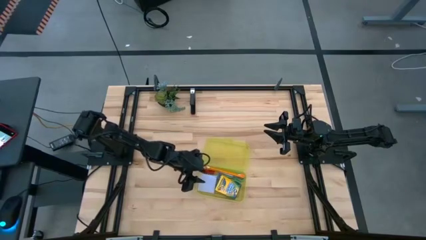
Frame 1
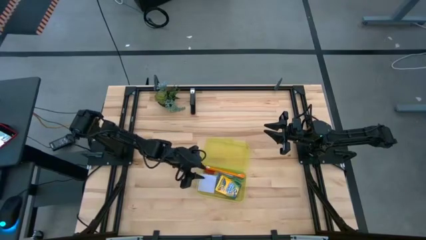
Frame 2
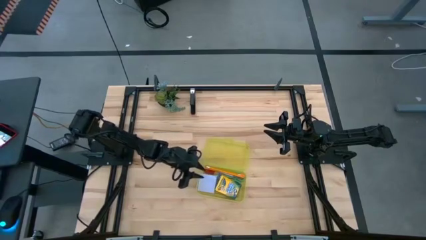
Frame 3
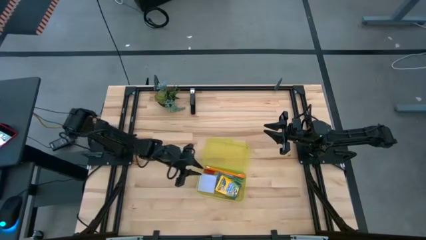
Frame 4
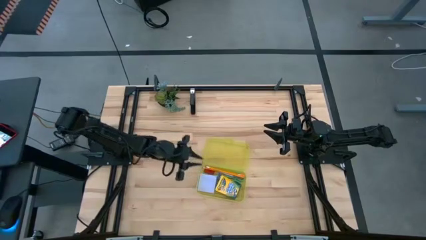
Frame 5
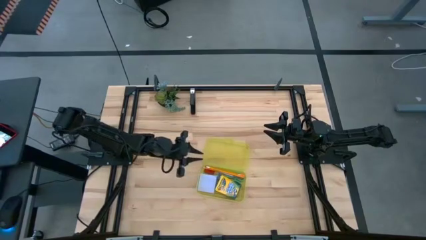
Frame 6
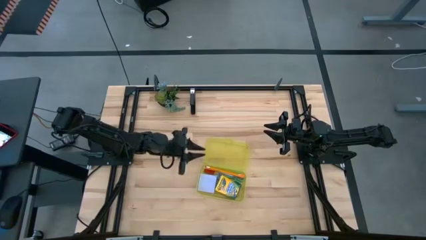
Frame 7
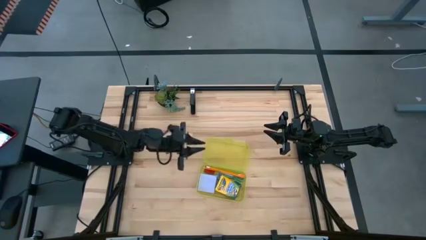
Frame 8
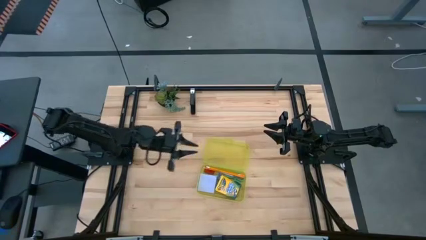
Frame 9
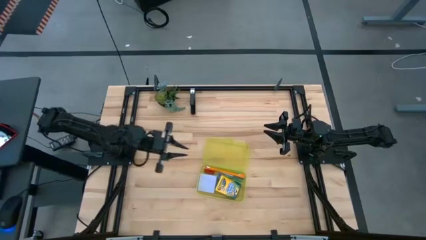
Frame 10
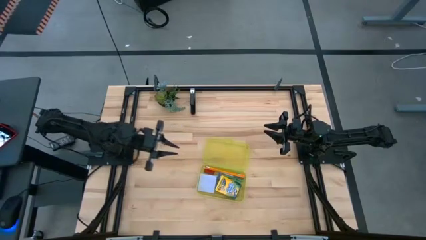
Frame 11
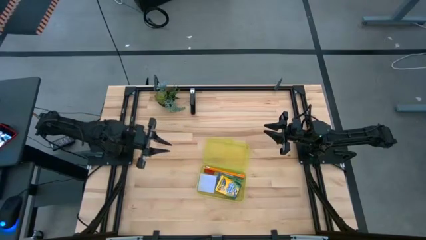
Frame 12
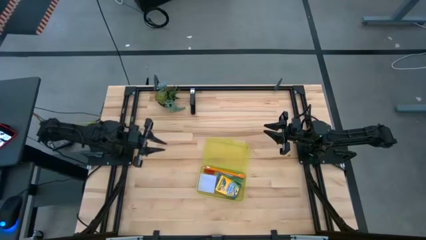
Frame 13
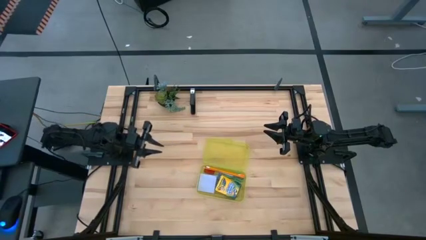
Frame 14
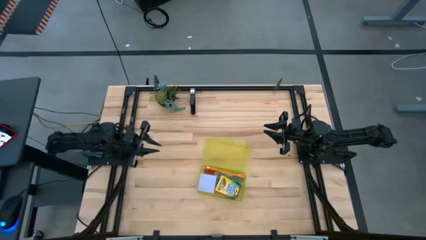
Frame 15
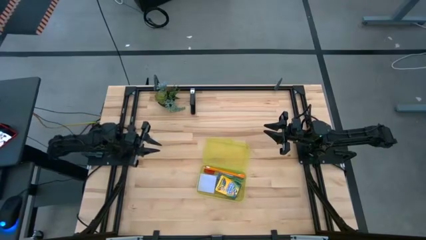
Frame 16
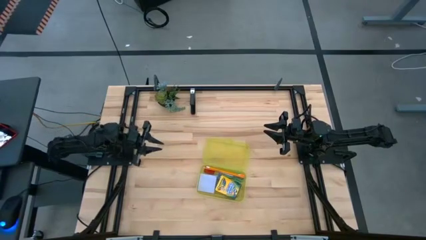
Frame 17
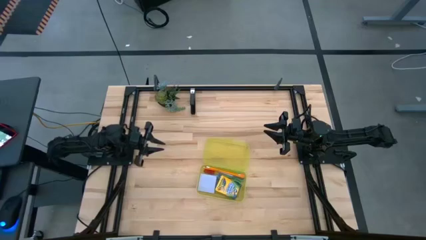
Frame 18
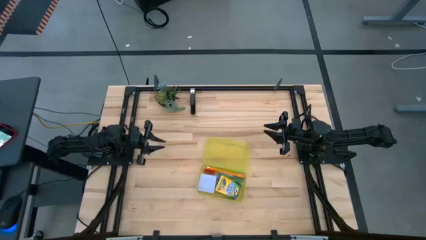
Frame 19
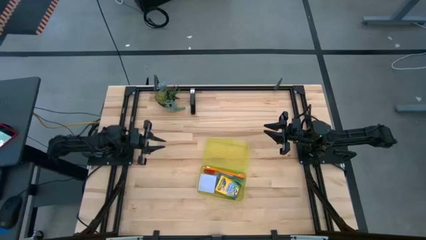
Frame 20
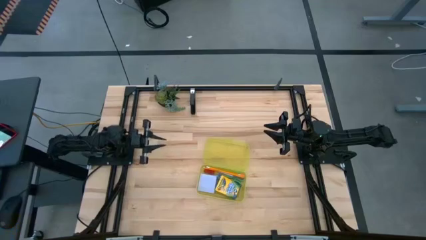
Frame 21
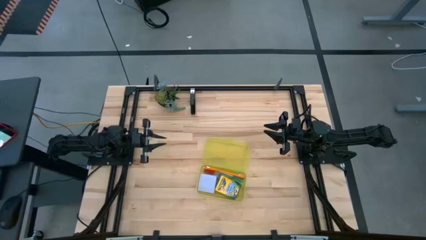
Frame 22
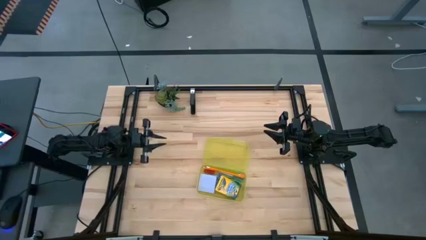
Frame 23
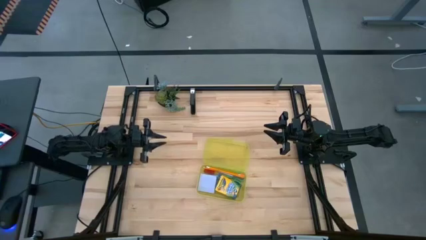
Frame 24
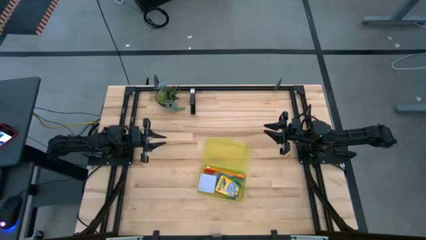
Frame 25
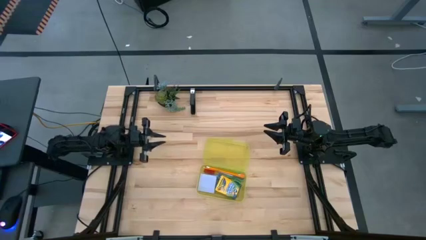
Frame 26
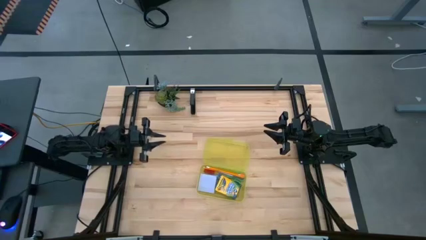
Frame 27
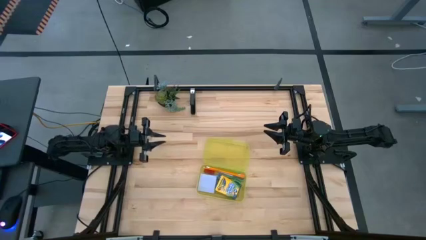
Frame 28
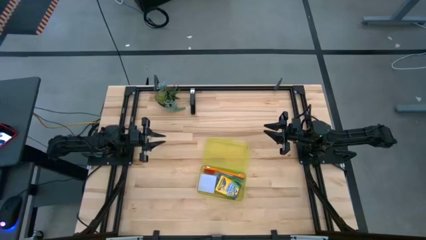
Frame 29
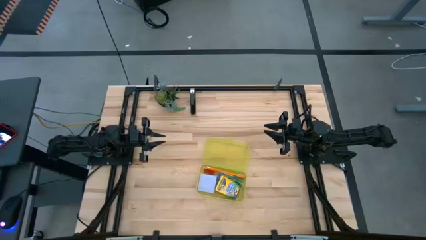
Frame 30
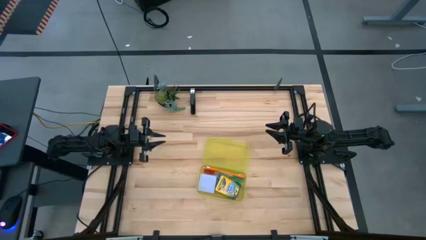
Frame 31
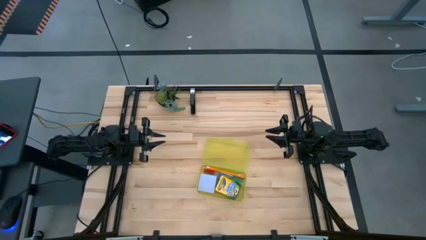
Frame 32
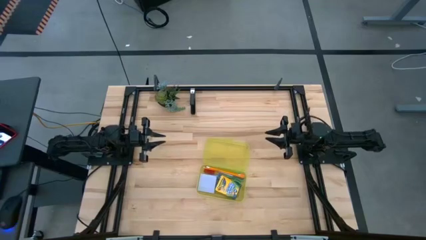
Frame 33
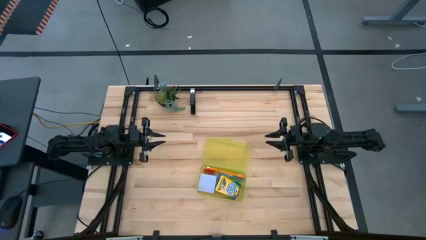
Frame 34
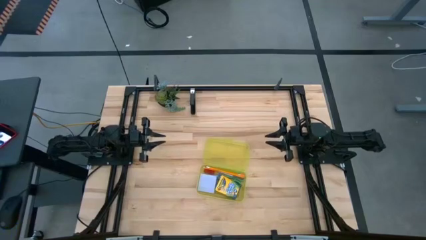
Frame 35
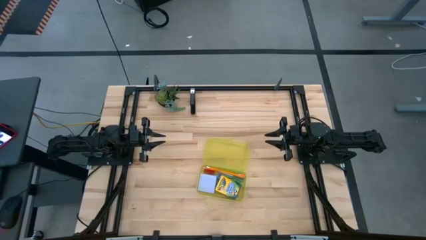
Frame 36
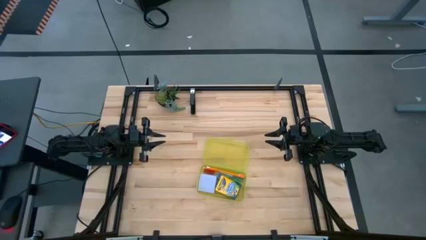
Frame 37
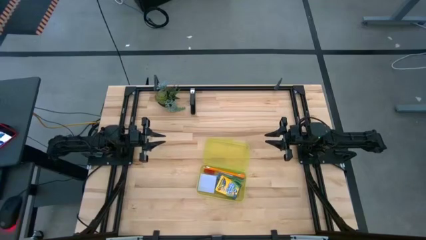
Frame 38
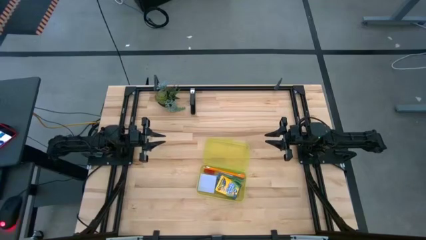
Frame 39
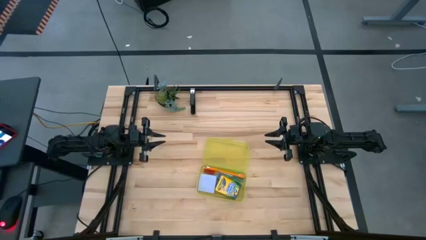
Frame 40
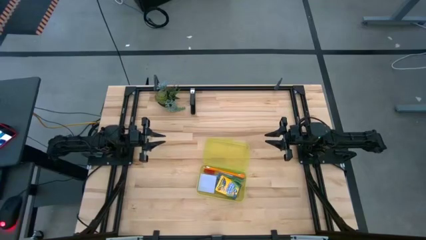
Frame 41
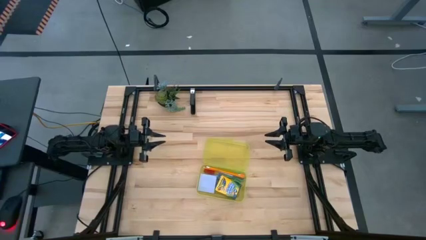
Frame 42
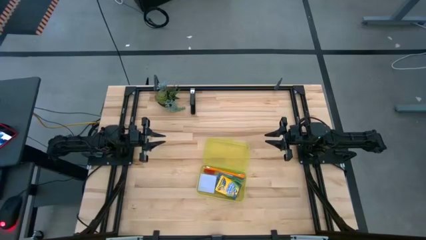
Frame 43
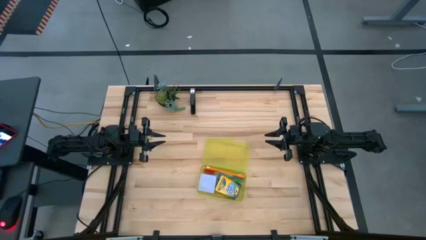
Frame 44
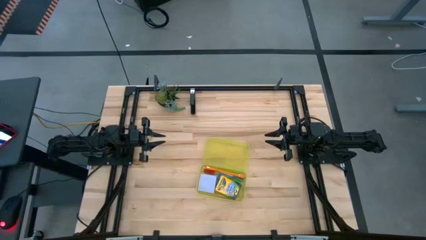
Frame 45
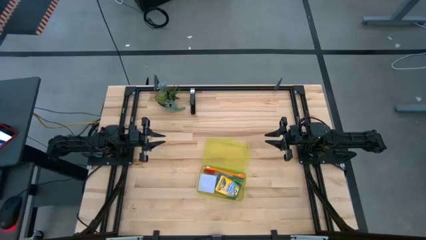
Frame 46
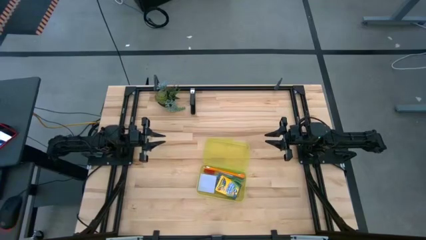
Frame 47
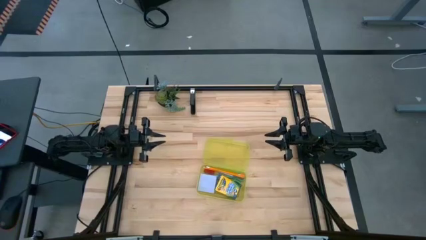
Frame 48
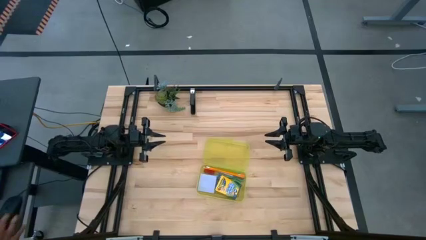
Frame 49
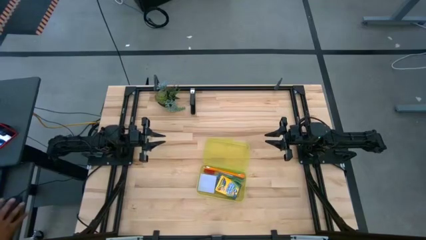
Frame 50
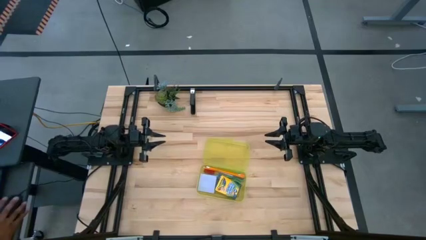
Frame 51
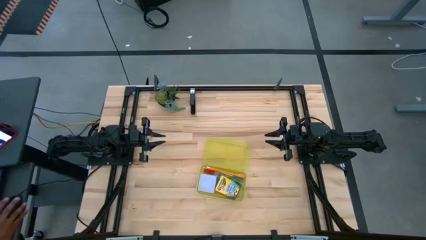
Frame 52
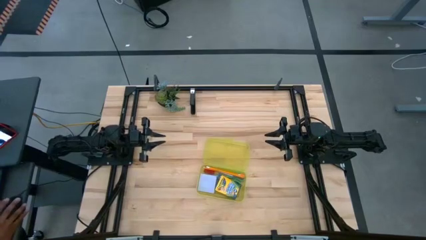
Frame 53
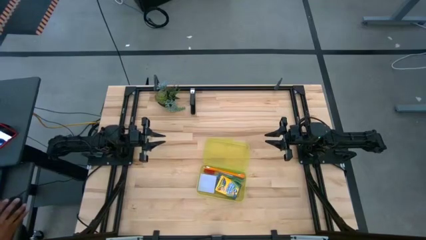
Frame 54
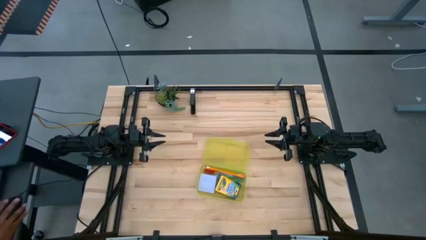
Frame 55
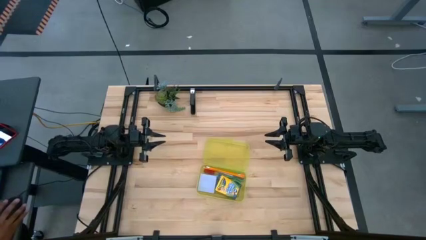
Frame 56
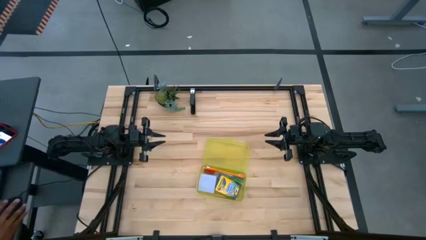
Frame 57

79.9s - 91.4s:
Task: Pack school essentials
Return to Home Position

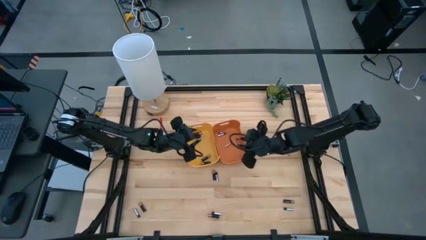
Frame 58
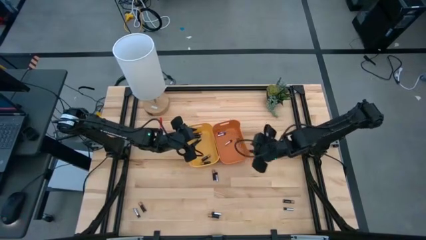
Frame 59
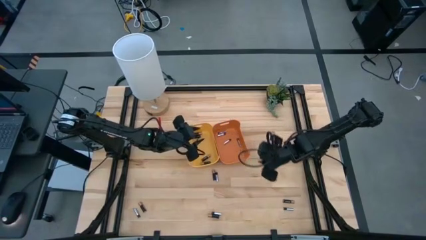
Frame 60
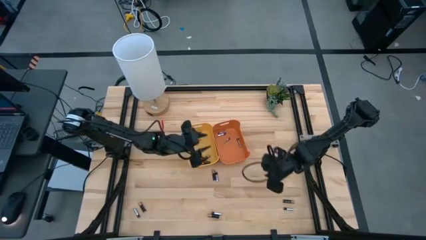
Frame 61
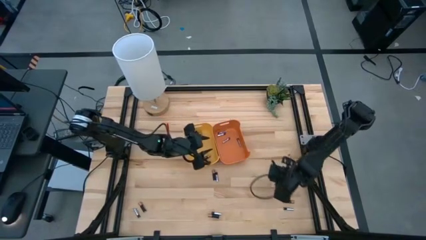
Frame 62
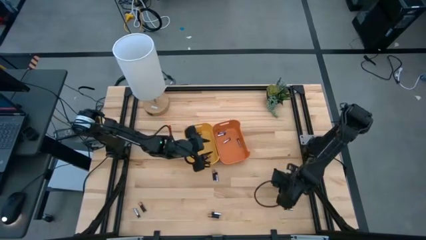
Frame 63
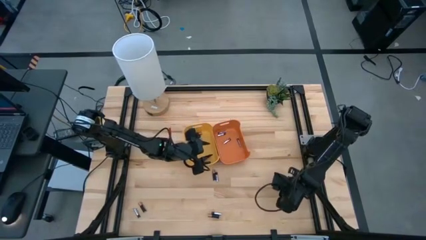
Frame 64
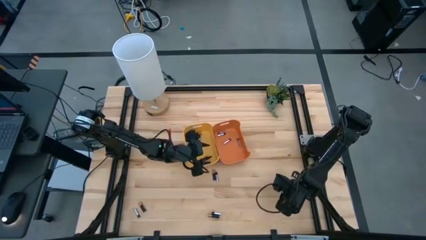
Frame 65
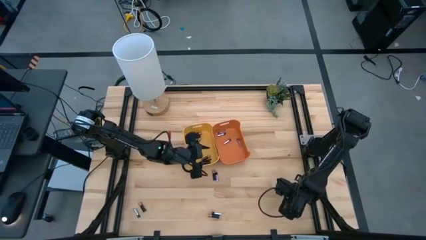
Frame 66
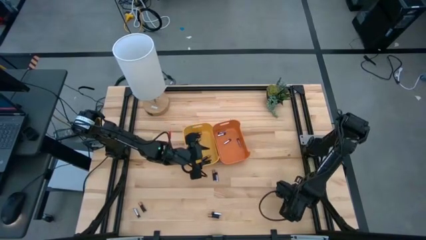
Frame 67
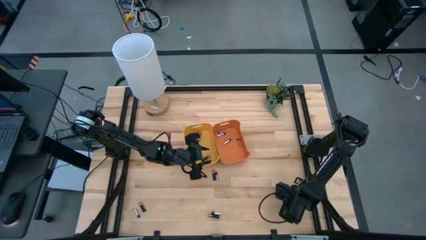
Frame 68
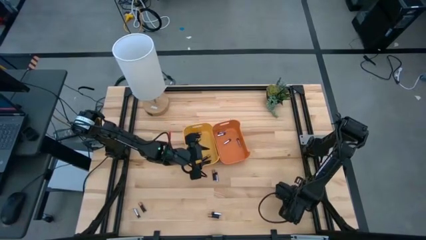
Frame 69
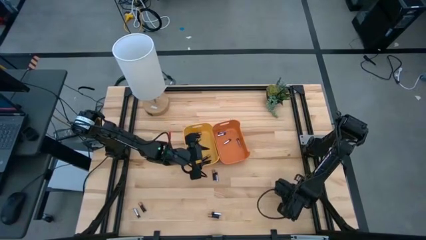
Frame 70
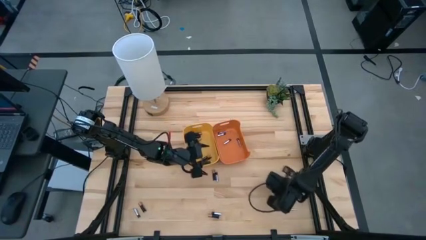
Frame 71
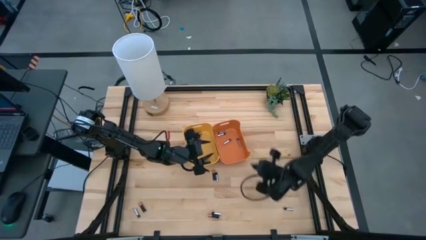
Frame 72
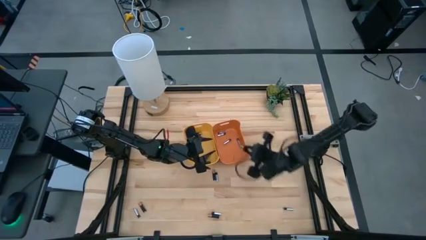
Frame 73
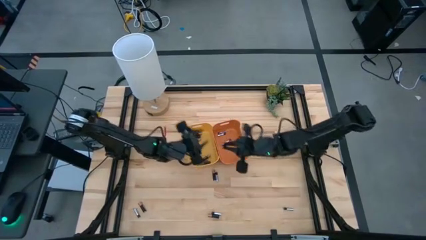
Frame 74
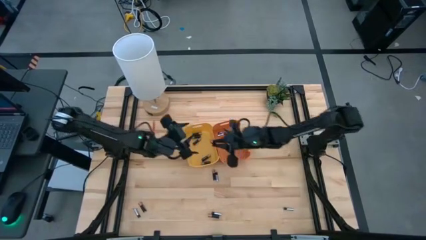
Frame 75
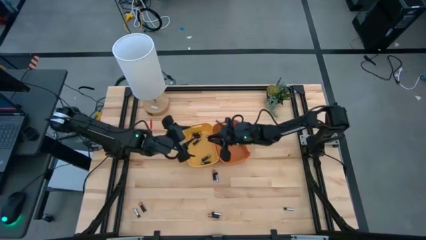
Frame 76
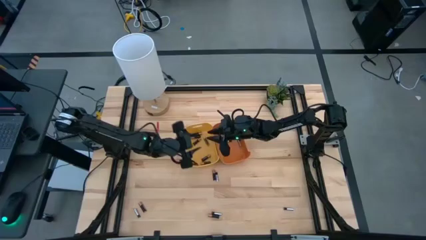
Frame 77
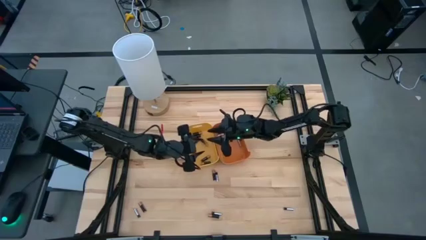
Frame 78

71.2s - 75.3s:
Task: Sort batteries
Put the bottom right black battery into the yellow bin
